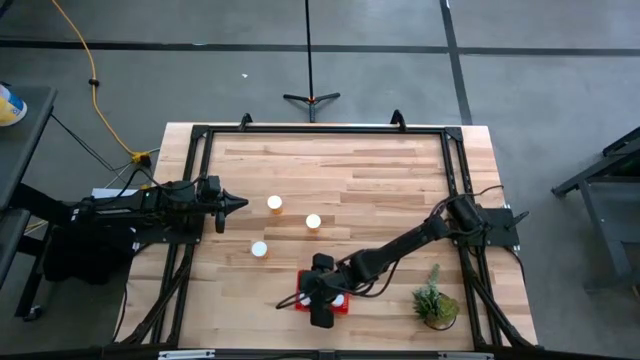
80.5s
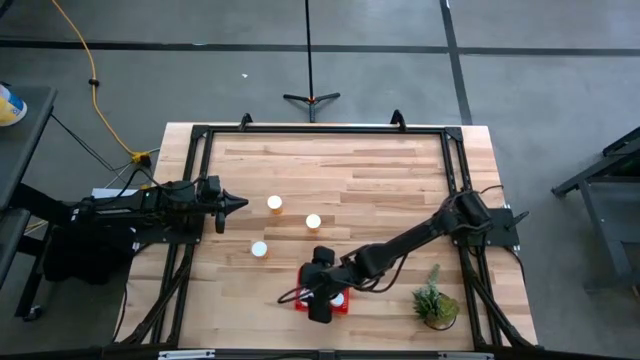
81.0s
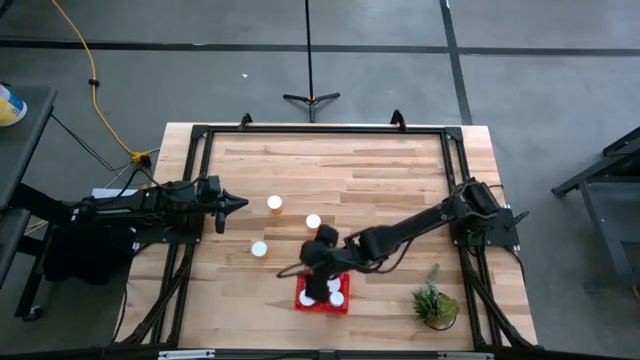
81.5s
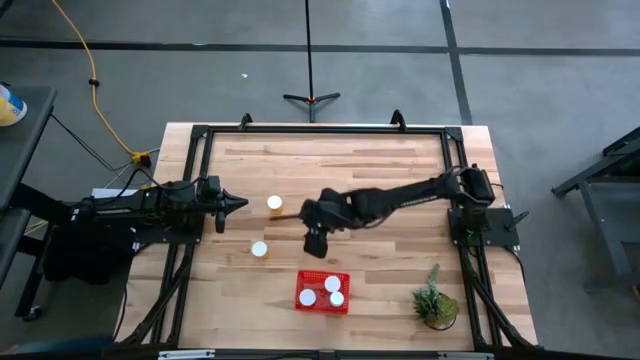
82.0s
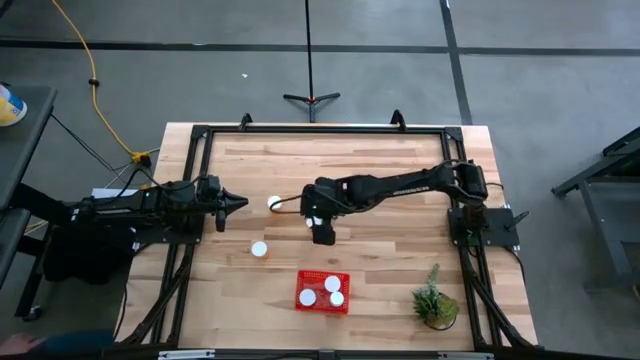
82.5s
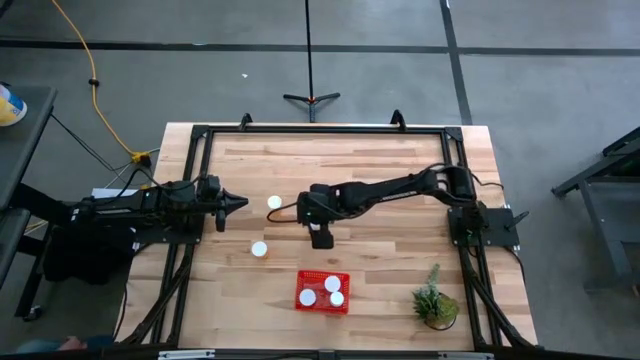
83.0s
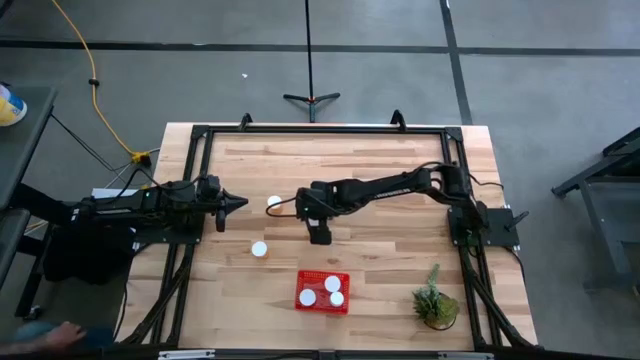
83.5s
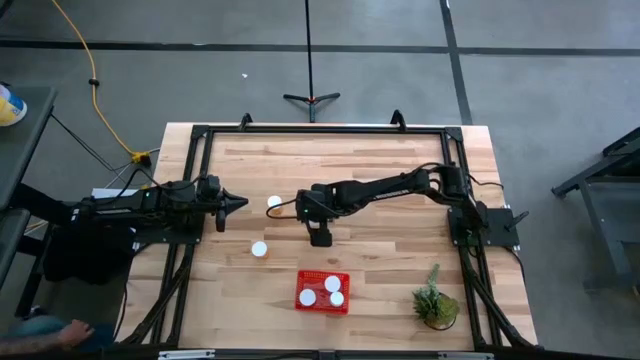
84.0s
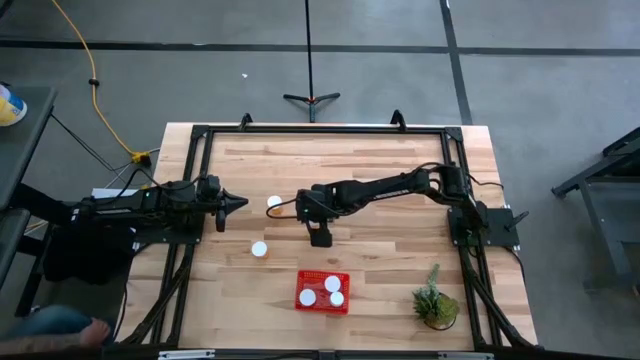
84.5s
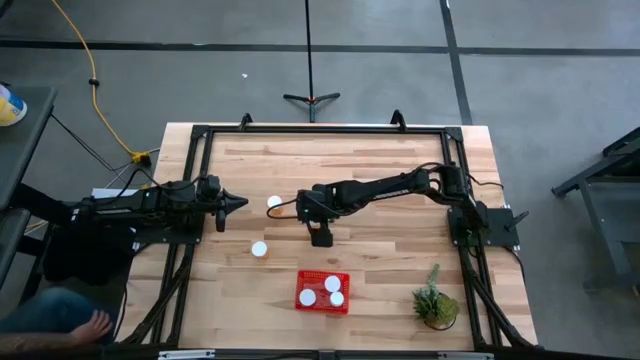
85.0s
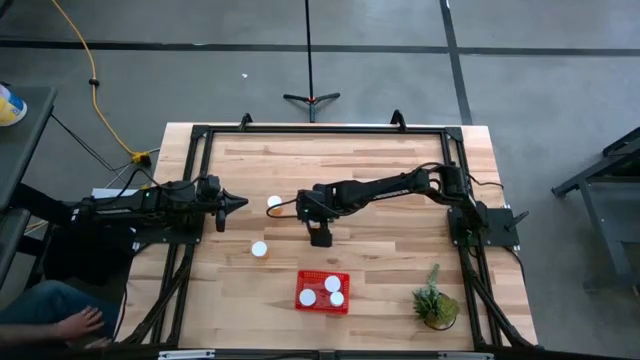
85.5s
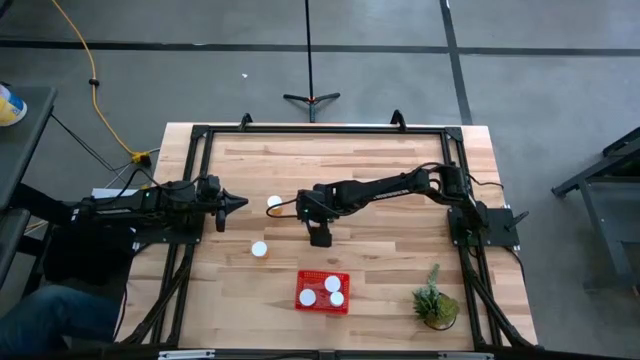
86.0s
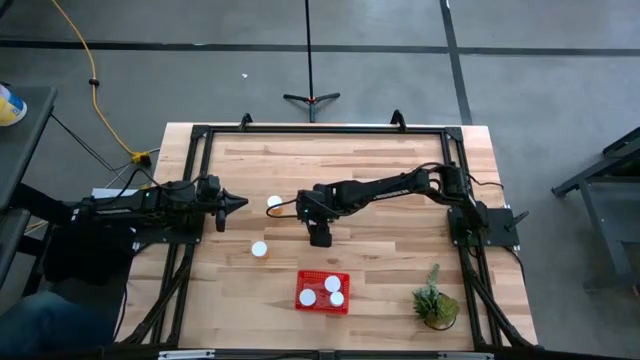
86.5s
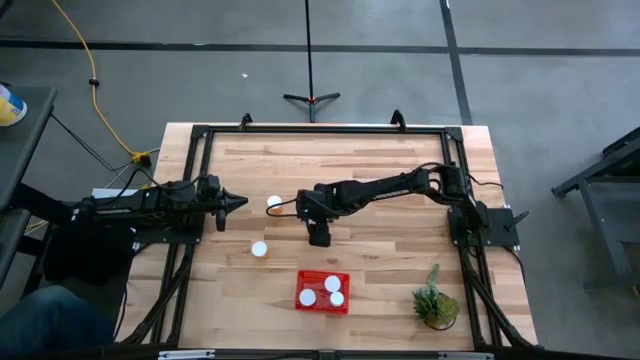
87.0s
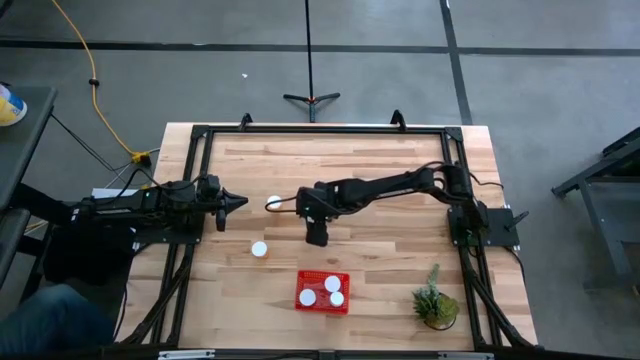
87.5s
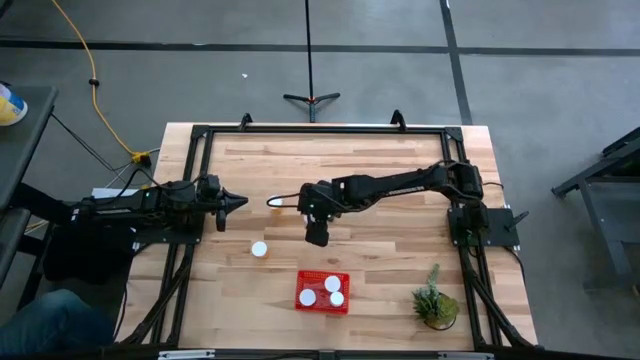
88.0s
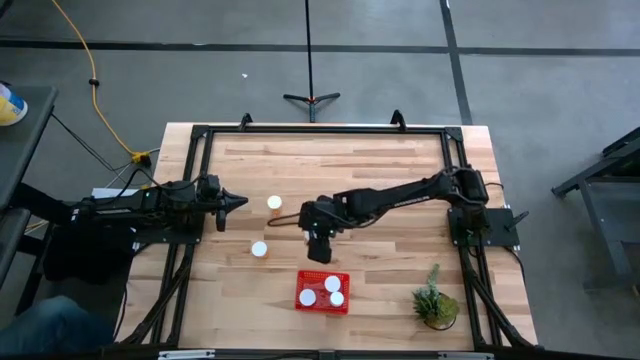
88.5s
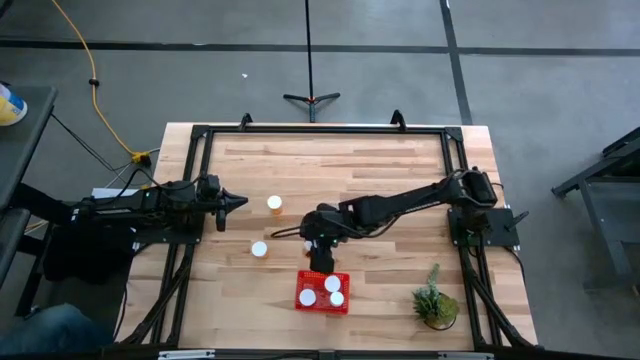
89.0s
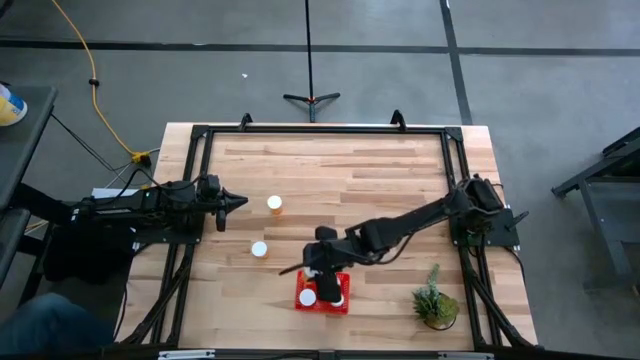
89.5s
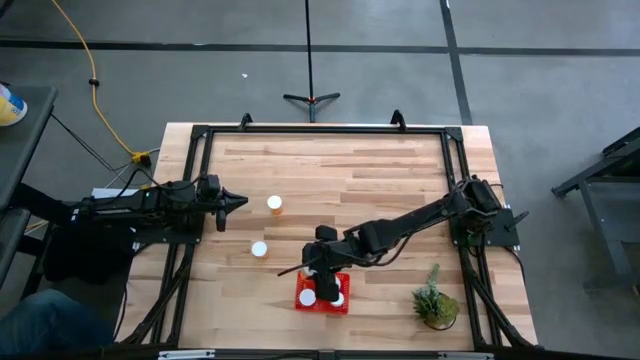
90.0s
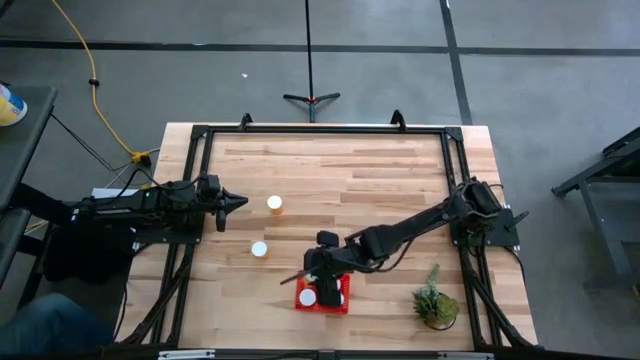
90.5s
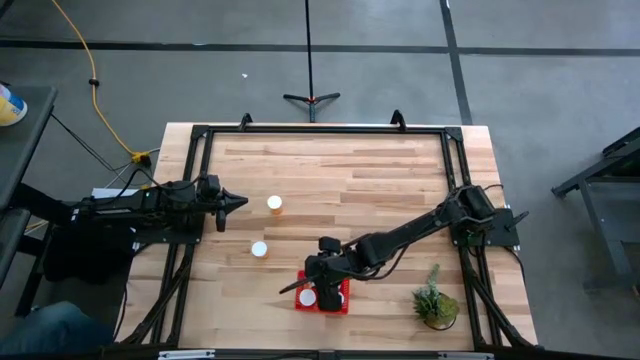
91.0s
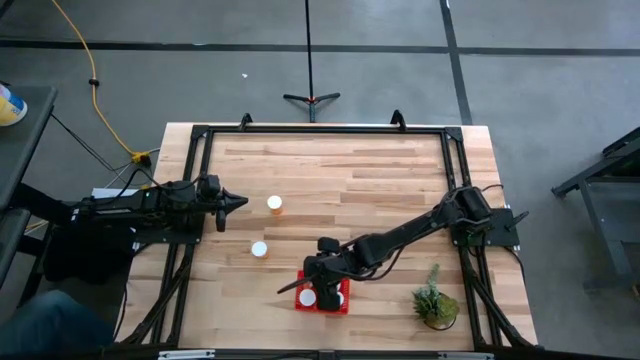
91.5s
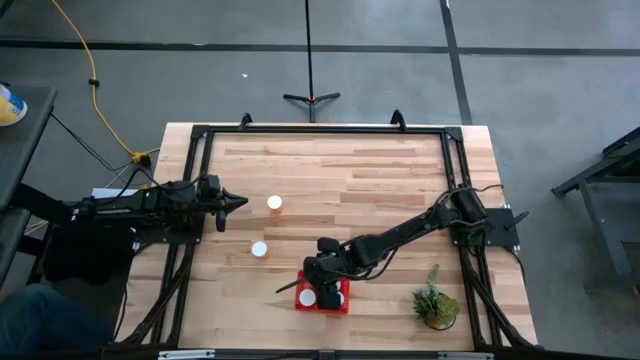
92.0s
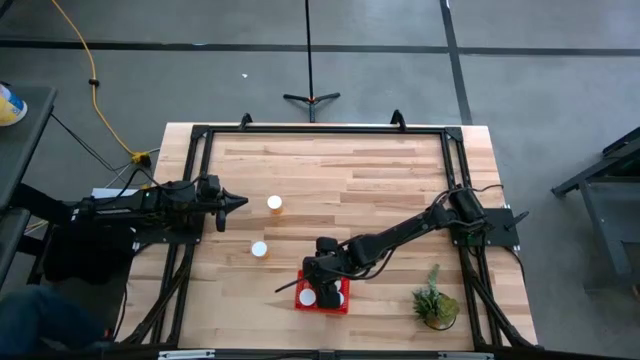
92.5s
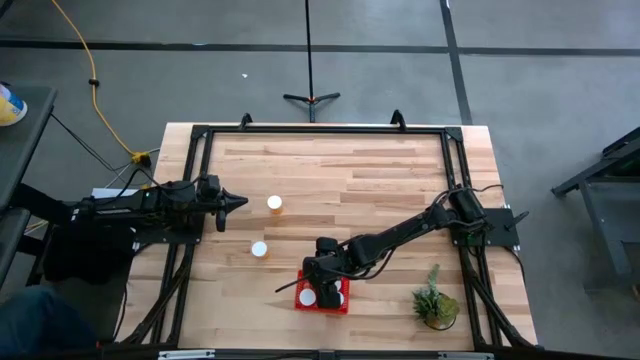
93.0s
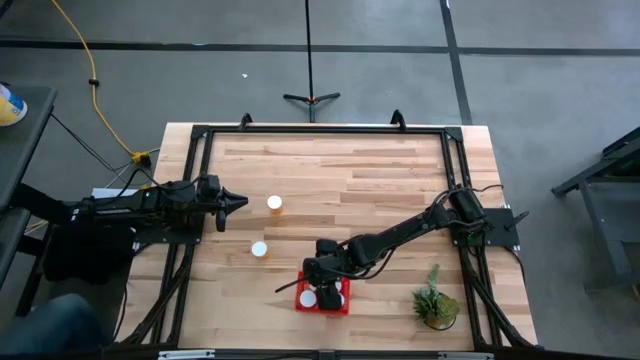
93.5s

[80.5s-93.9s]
Task: Pick and place pill bottles into a basket
Put the orange pill bottle into the red basket

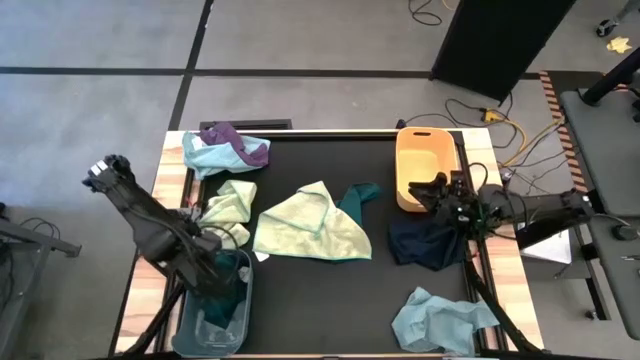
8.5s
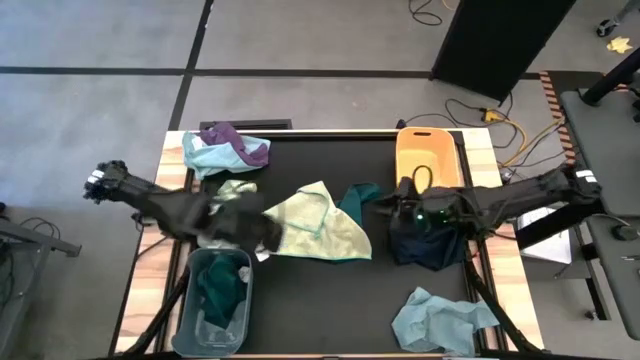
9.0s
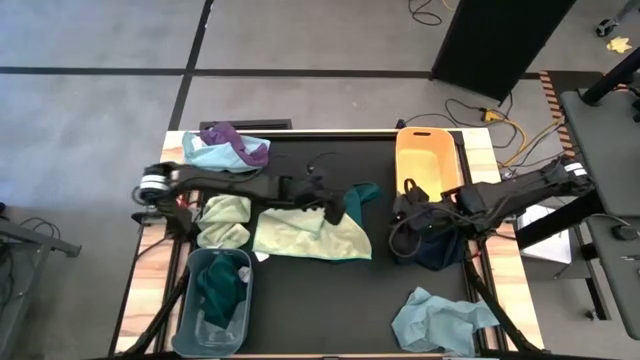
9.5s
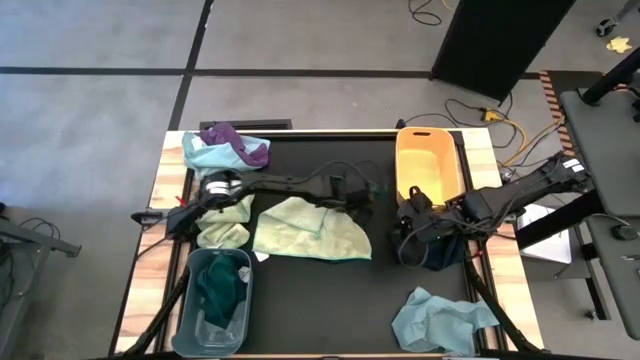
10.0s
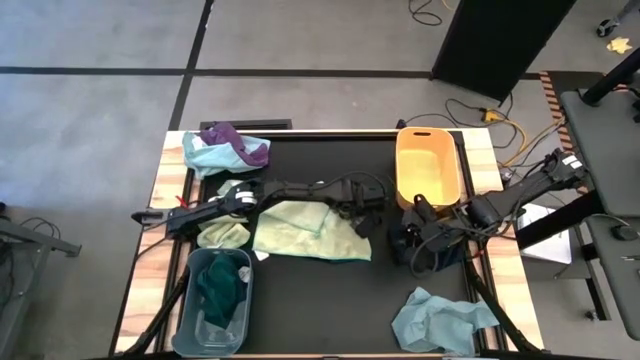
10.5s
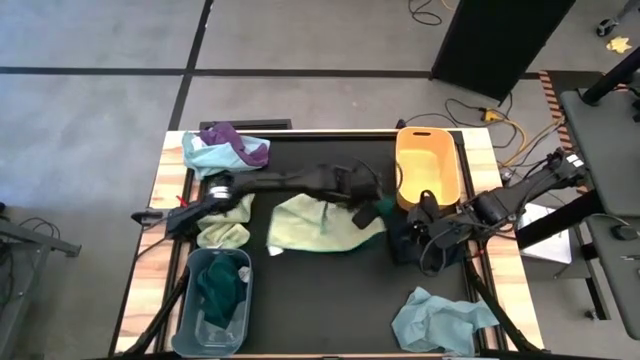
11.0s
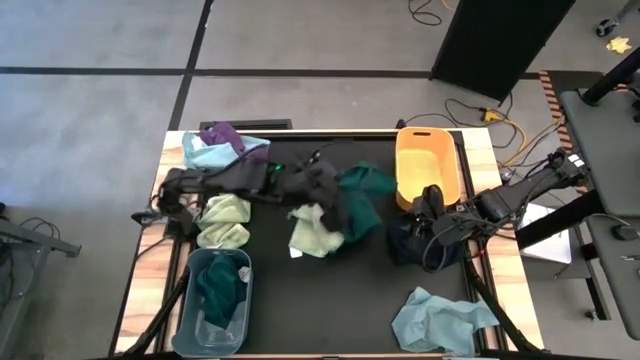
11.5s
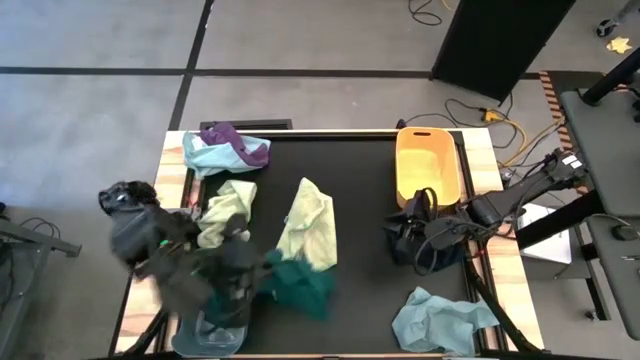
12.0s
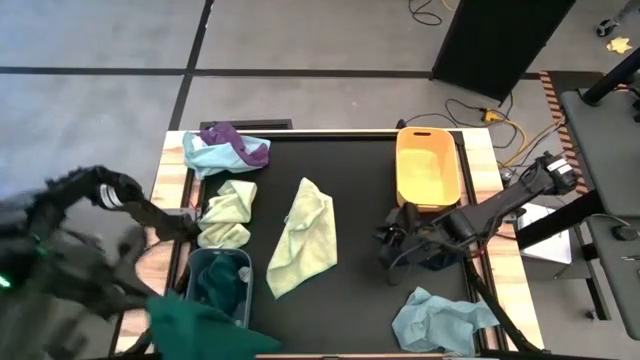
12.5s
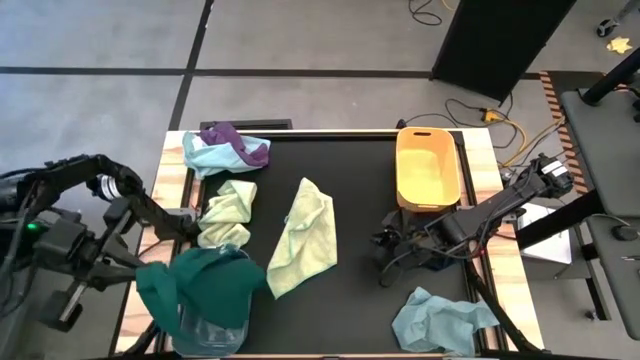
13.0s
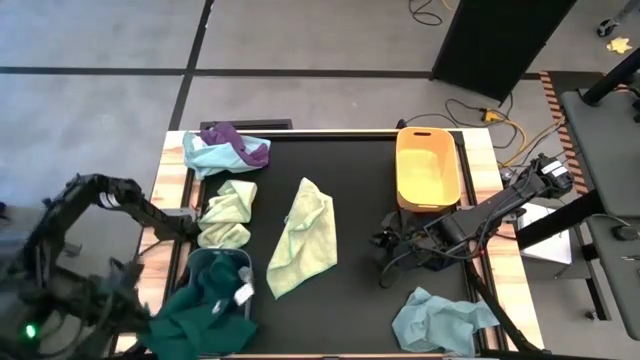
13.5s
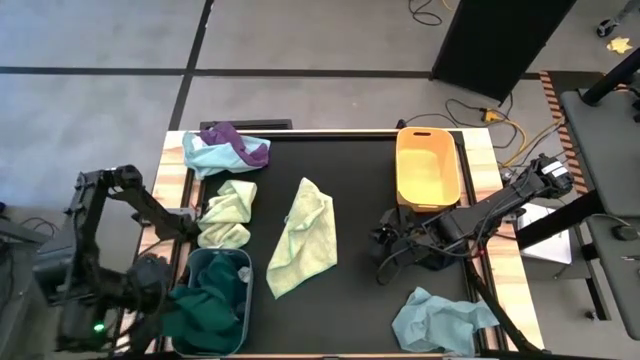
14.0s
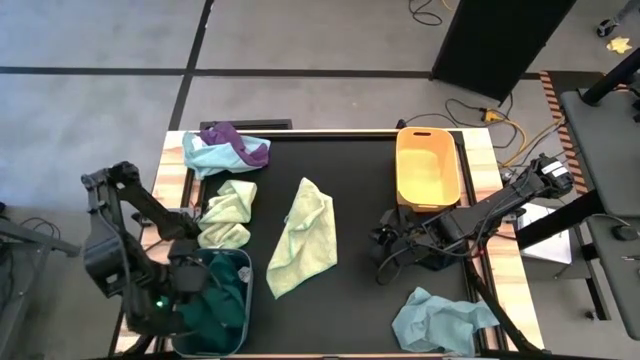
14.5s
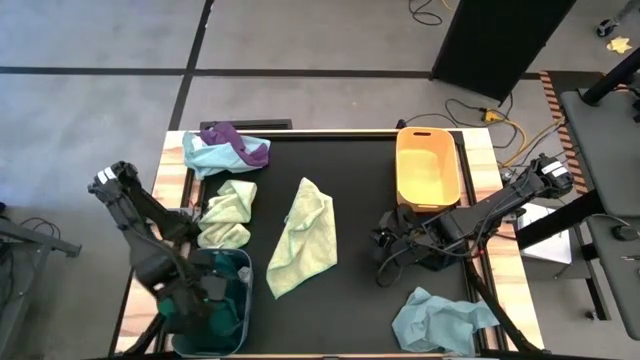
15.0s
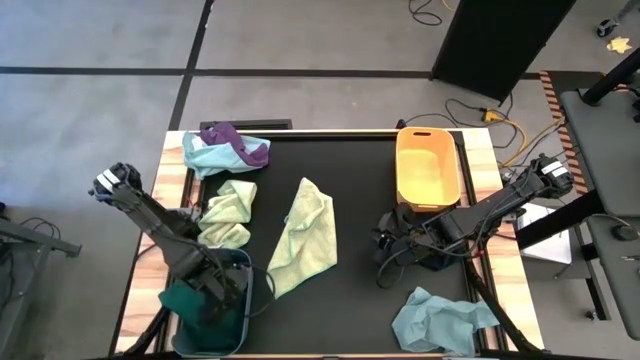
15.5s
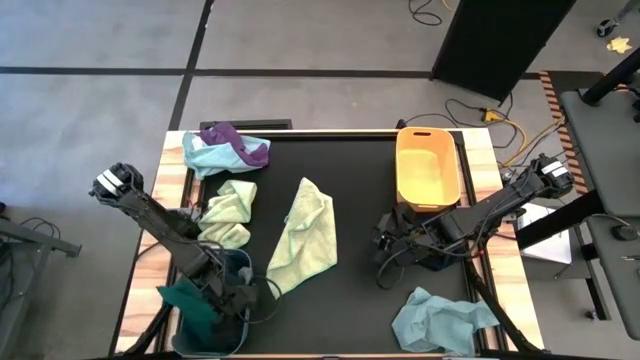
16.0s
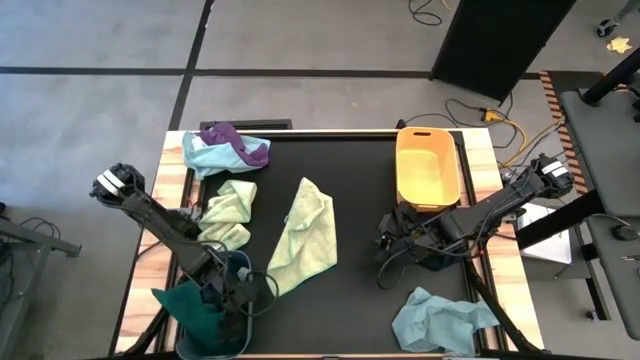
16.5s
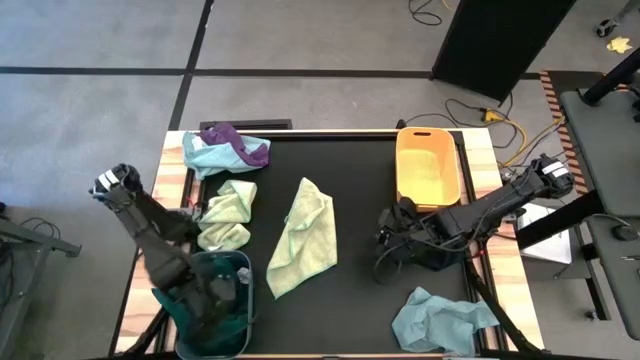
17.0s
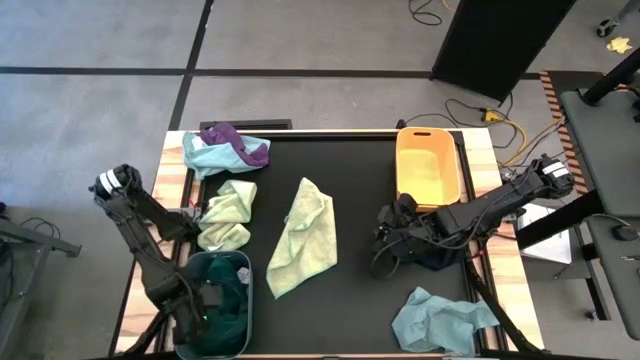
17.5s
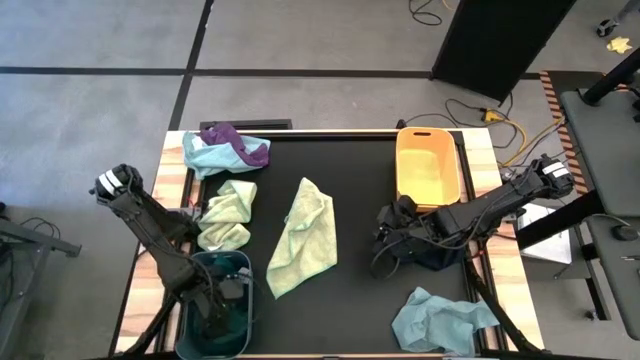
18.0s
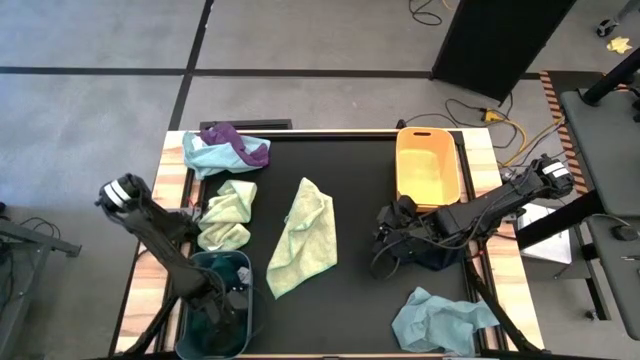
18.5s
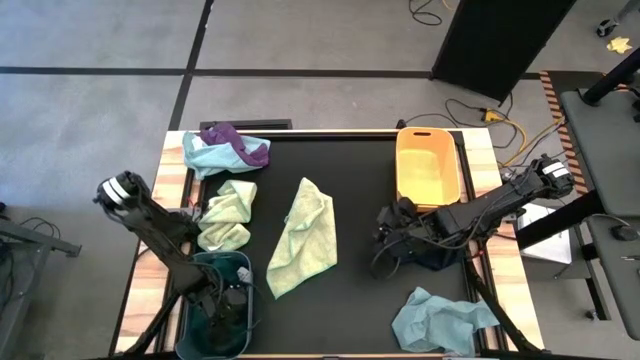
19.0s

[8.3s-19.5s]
Task: Sort microfiber towel by color & place in baskets
Put the dark green microfiber towel into the green bin
